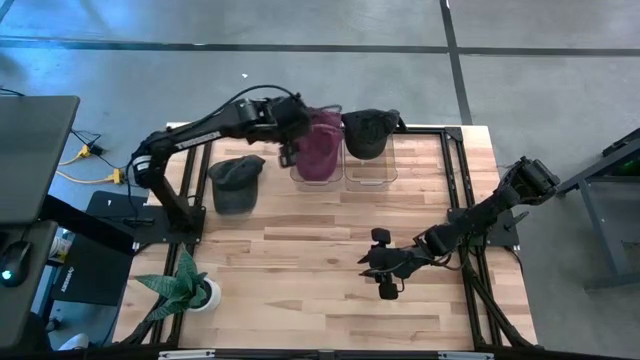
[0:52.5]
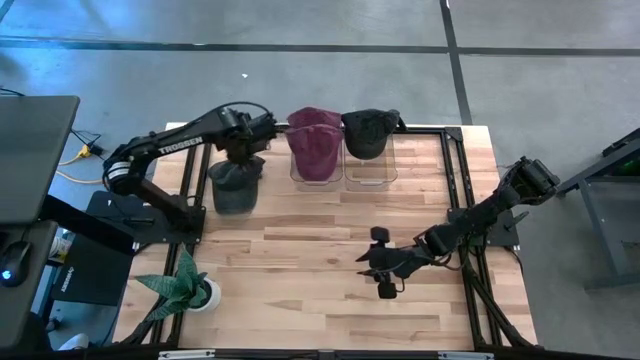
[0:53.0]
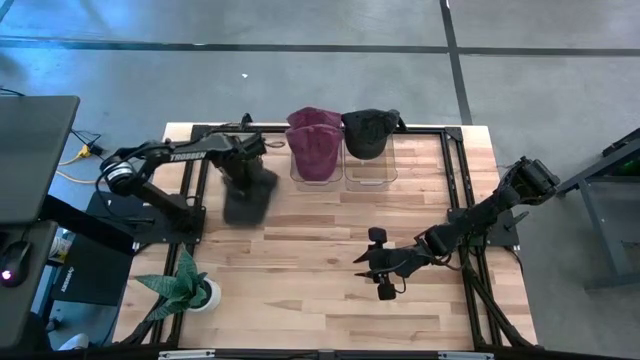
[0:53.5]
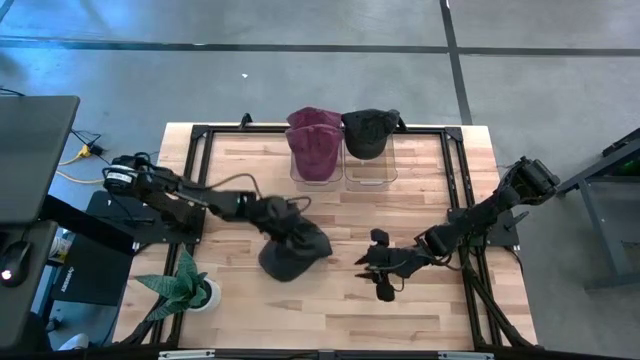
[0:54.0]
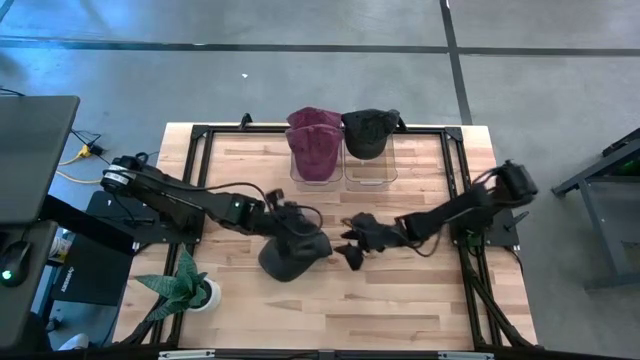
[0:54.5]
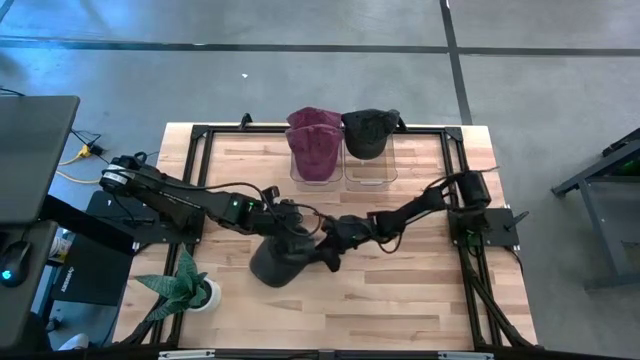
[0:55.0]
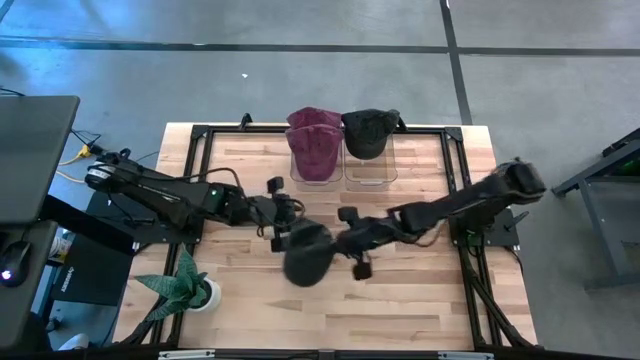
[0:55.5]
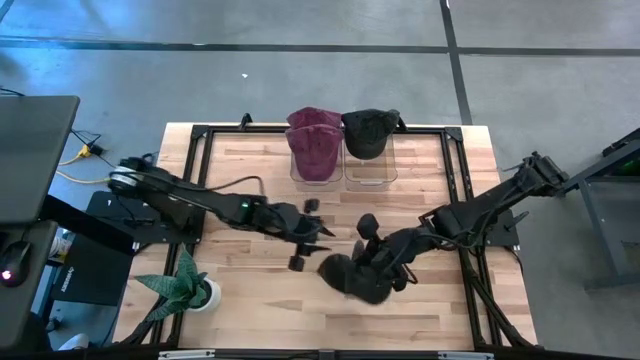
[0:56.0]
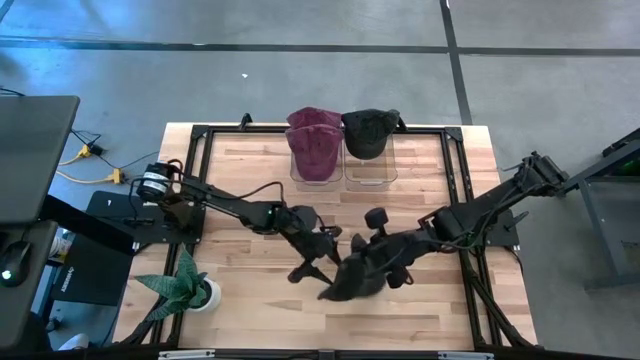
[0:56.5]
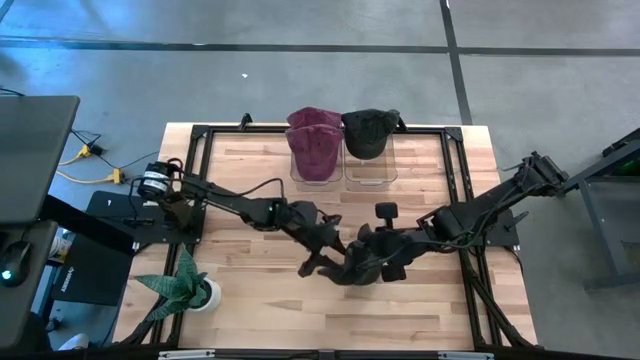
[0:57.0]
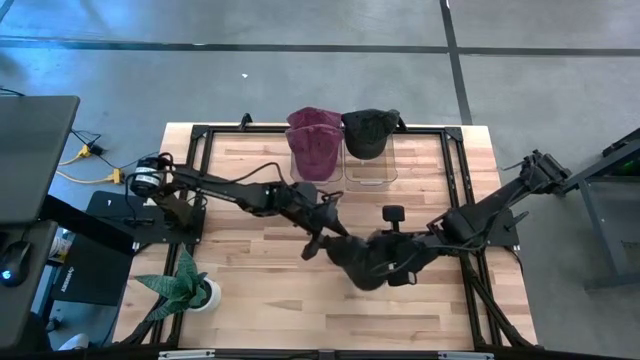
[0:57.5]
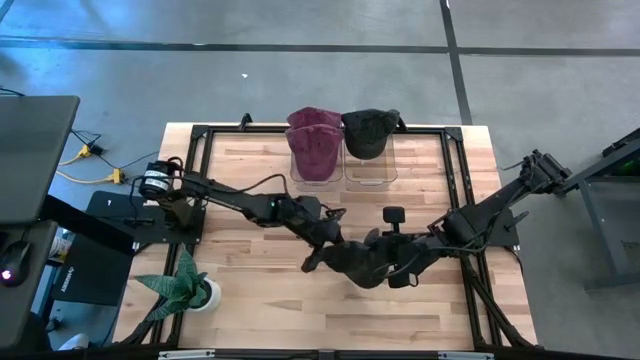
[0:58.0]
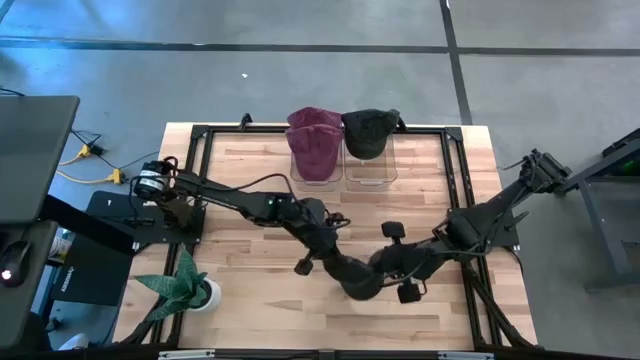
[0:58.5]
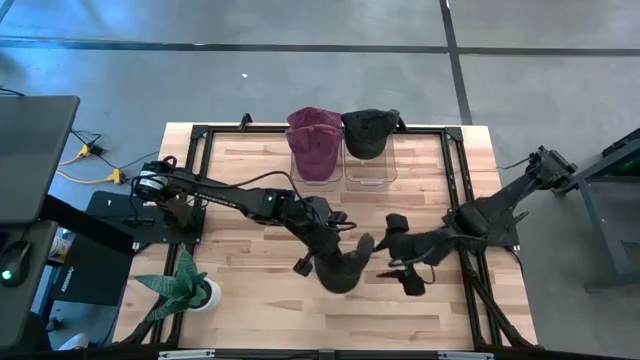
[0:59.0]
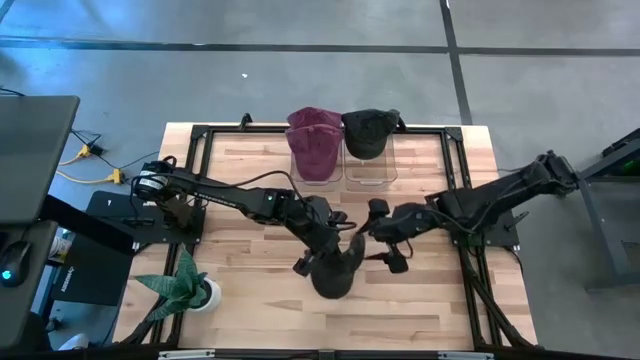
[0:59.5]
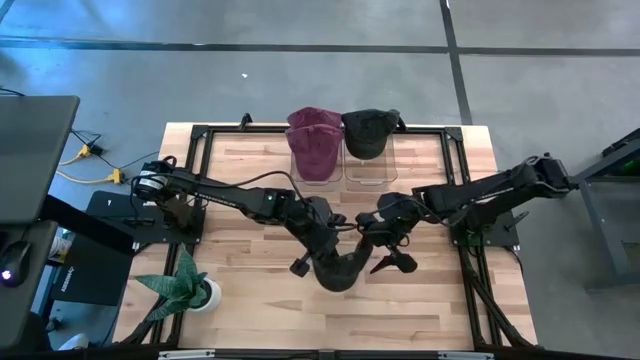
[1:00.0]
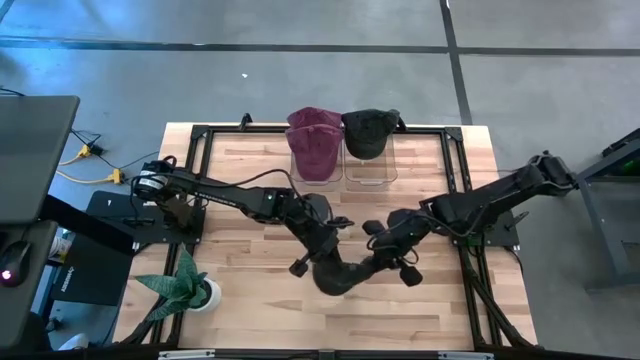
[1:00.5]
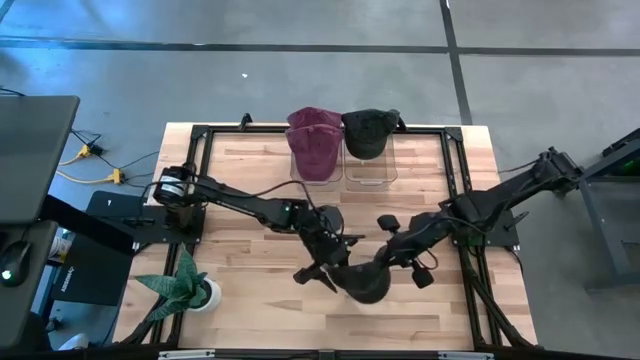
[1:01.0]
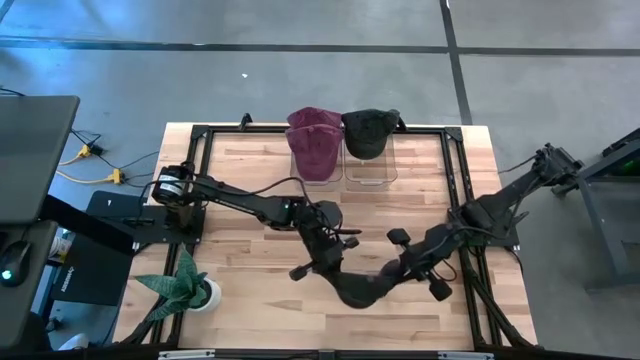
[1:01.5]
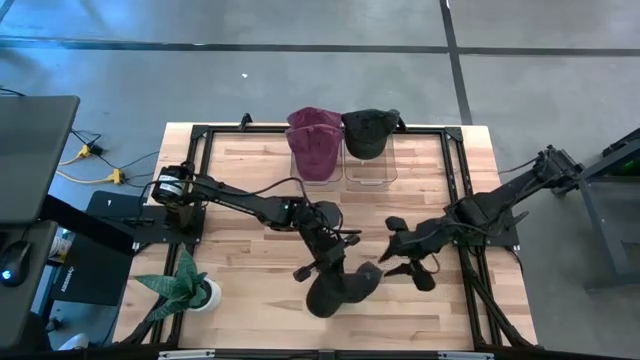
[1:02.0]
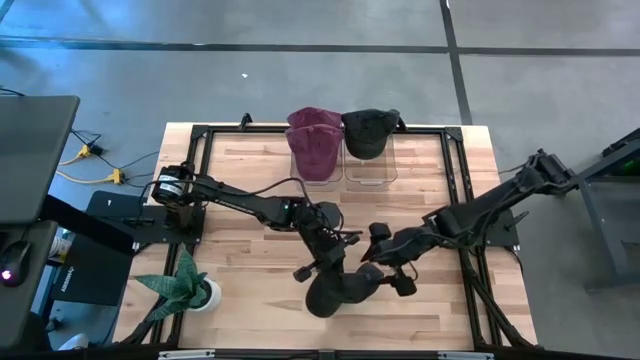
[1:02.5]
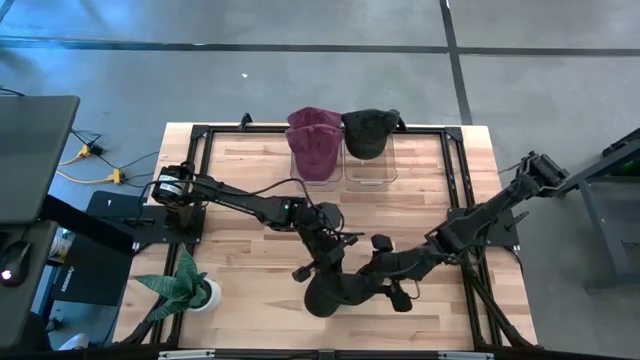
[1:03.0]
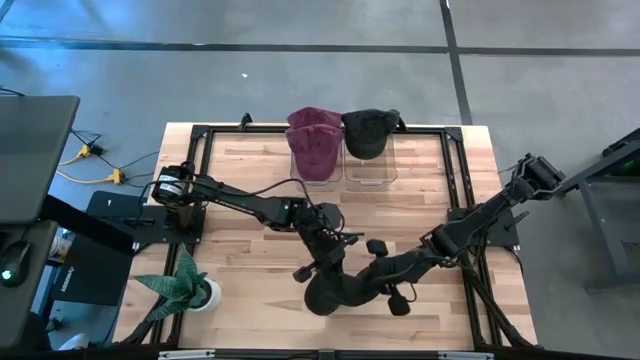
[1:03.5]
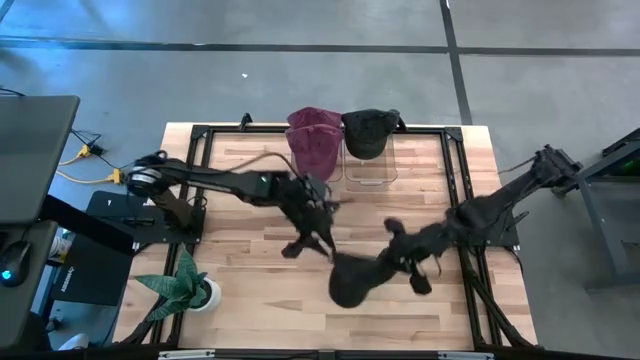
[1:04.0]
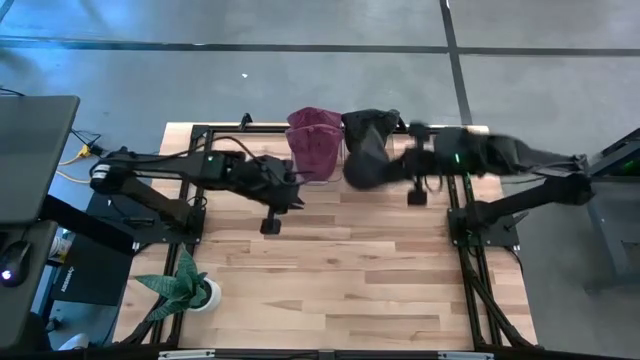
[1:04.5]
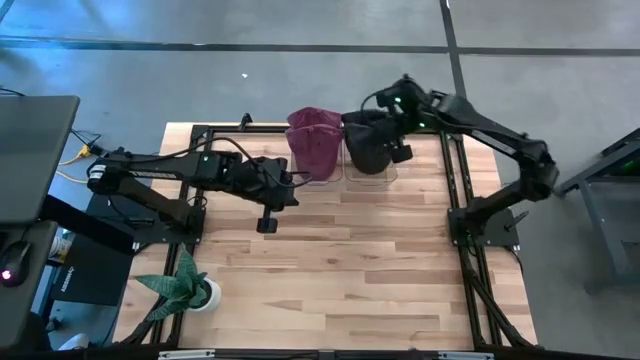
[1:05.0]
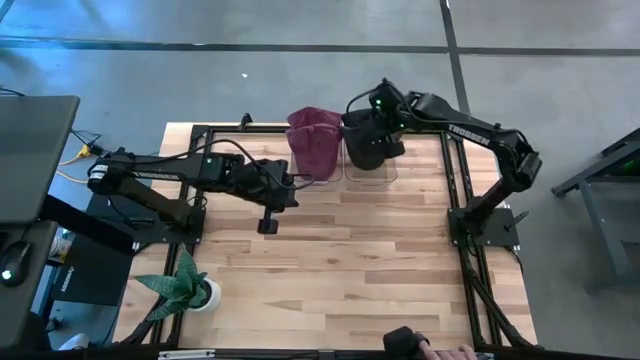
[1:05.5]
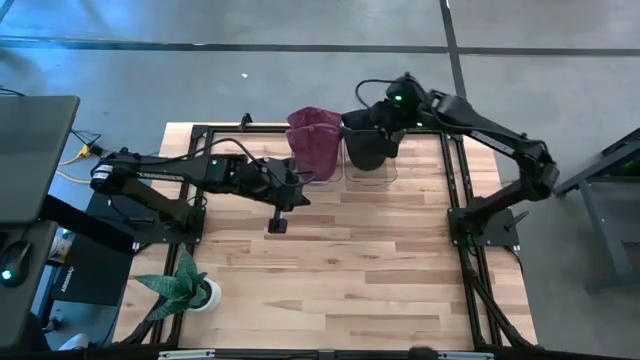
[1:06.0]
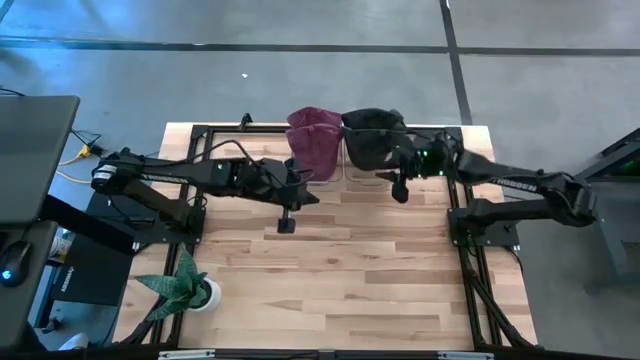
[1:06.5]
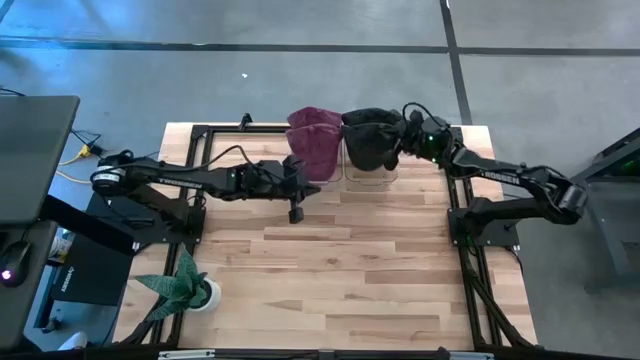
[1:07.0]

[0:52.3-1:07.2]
Task: Pick & Place hat
Put the black cap into the right transparent bin

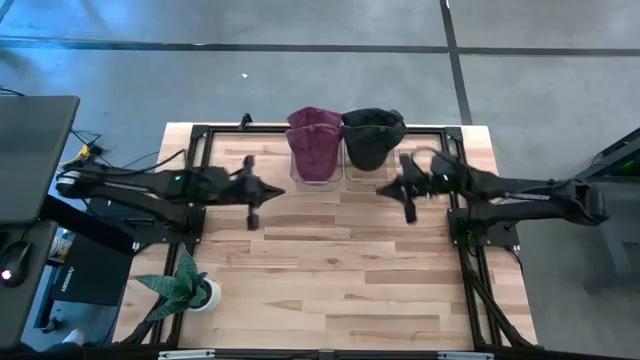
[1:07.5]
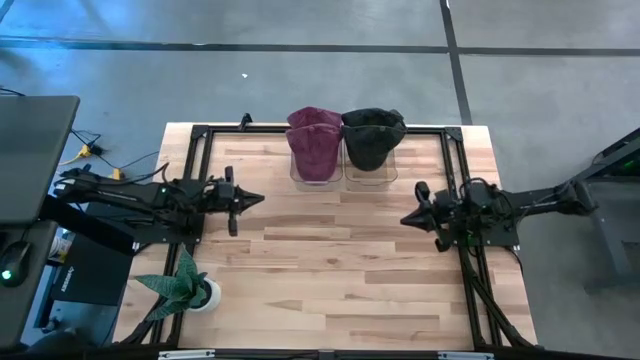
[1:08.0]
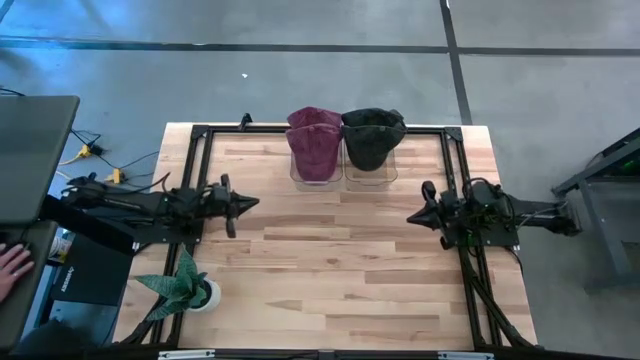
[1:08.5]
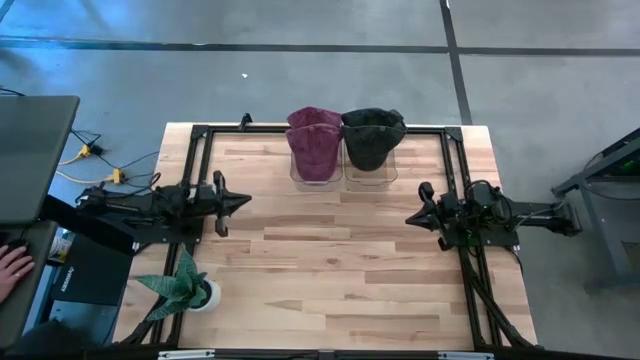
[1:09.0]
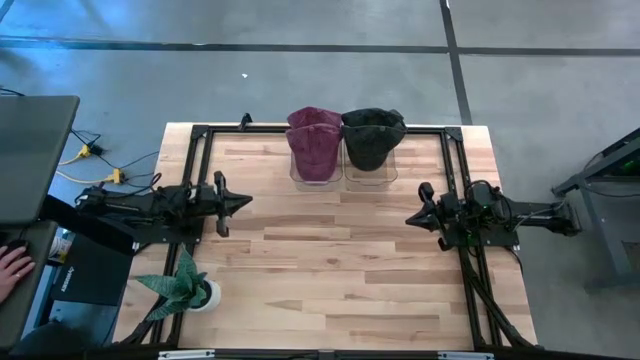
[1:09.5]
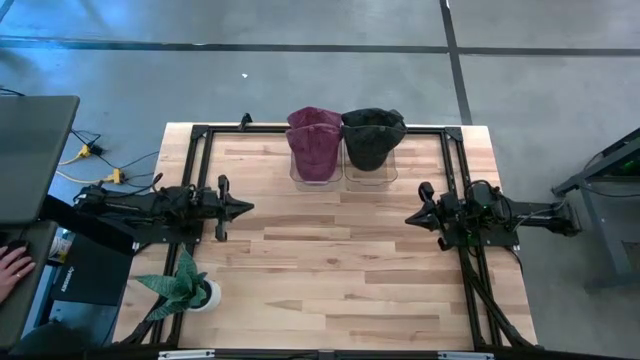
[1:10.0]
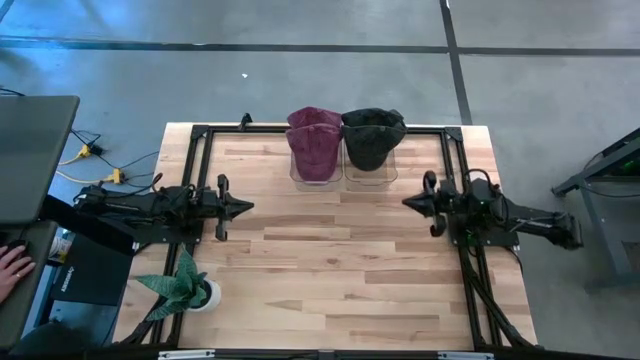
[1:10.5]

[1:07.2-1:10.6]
Return to Home Position

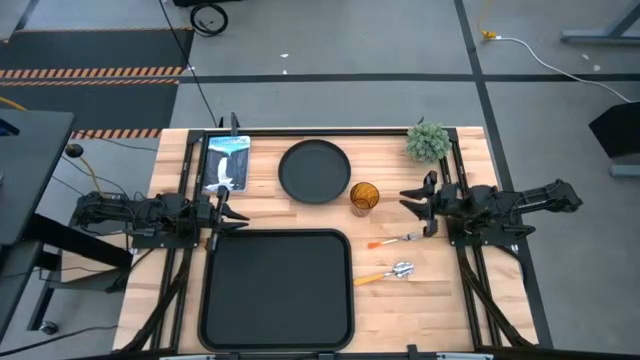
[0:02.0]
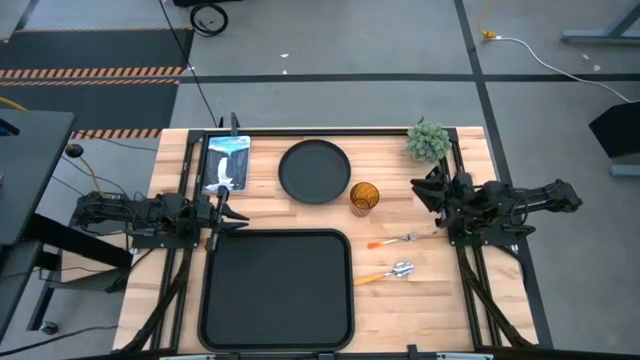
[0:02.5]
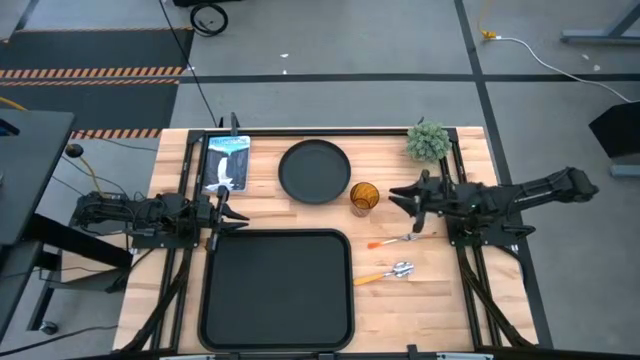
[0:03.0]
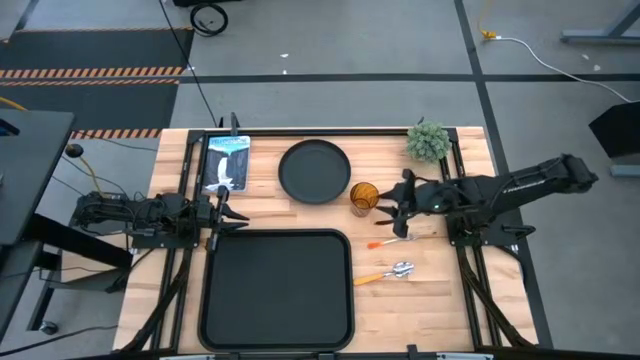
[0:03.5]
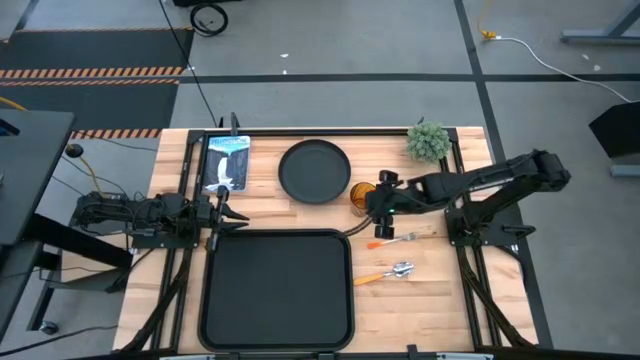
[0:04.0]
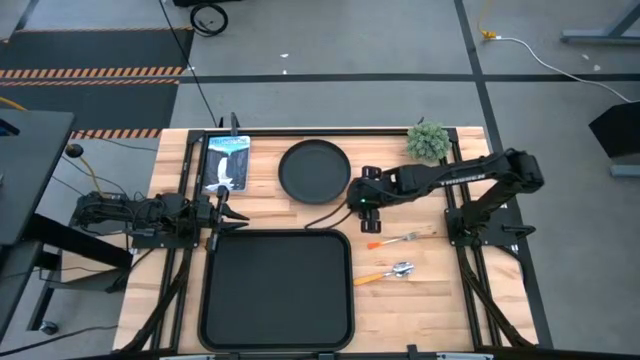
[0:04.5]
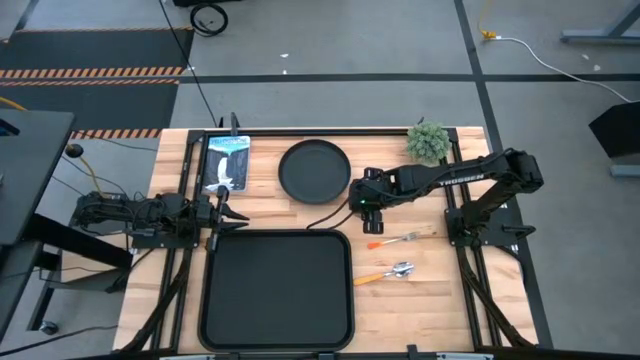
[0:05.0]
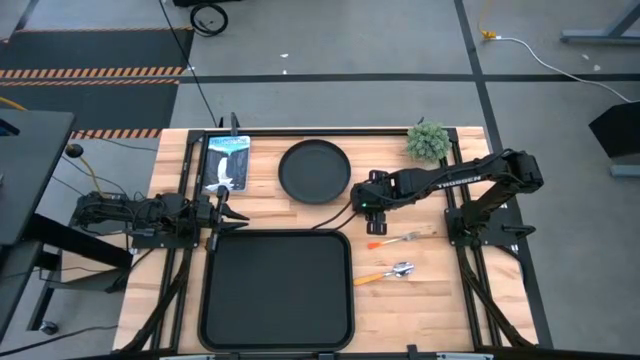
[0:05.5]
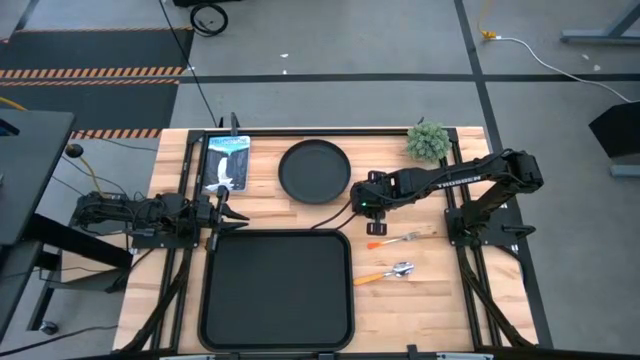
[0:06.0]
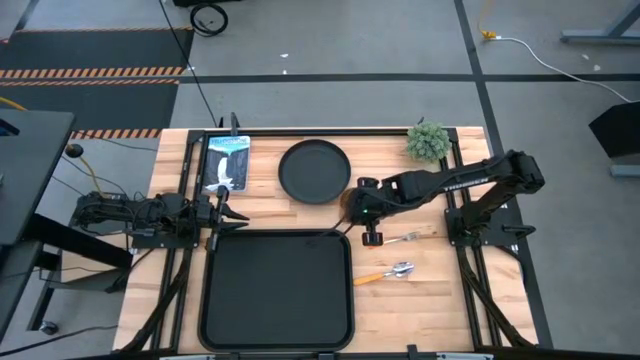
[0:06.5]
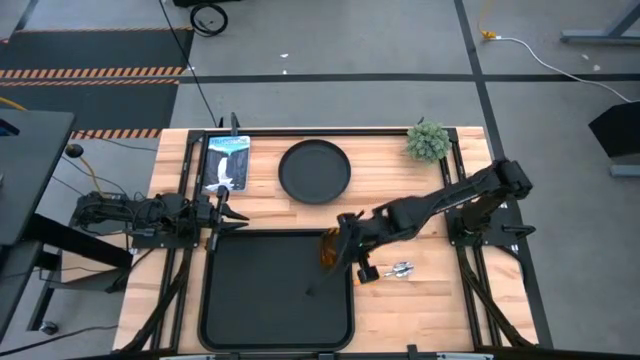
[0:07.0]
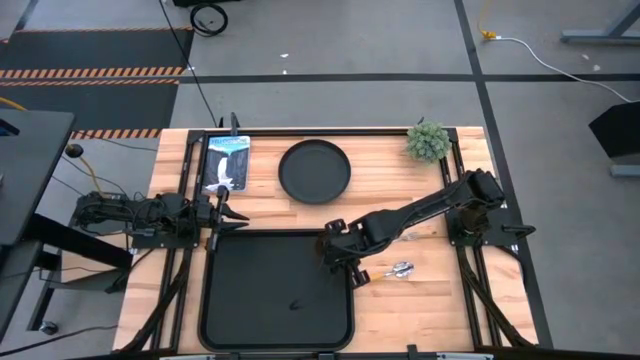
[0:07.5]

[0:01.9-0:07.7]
Task: Pick and place plate/cup/fork/spoon on tray
Put the brown cup on the black serving tray
